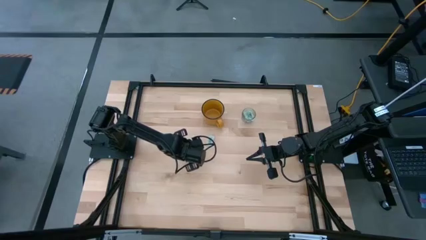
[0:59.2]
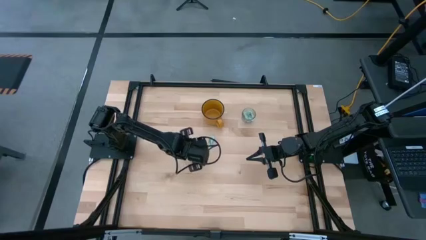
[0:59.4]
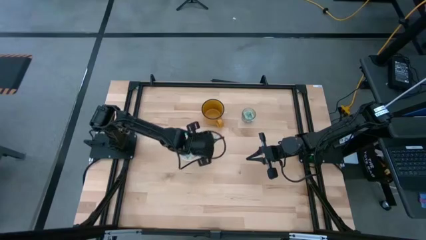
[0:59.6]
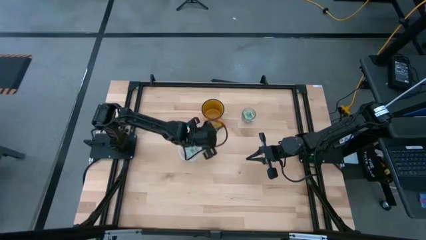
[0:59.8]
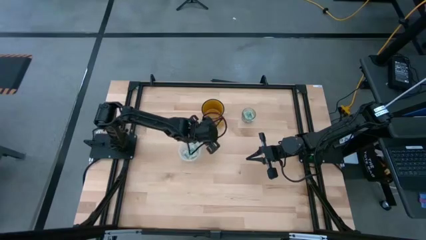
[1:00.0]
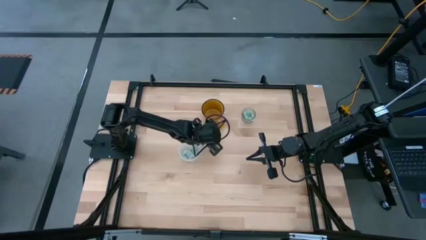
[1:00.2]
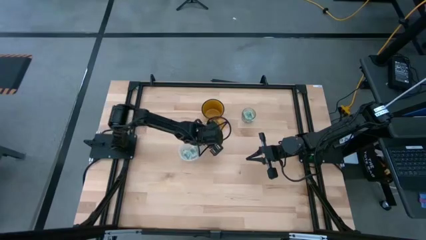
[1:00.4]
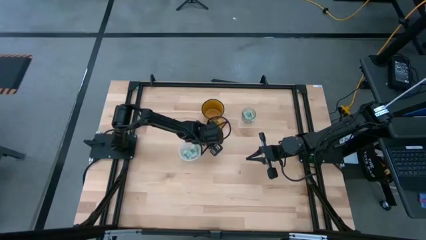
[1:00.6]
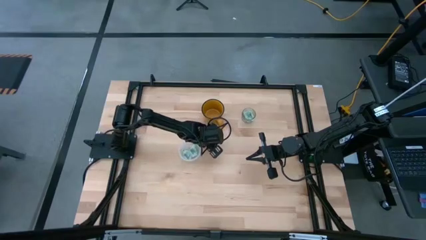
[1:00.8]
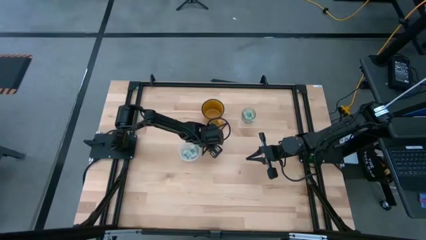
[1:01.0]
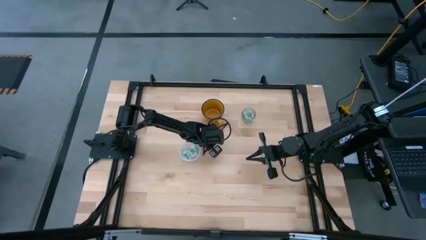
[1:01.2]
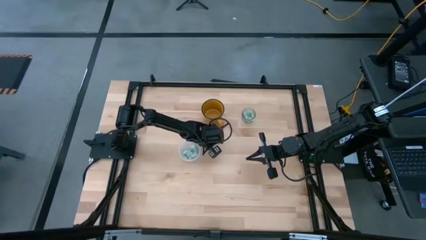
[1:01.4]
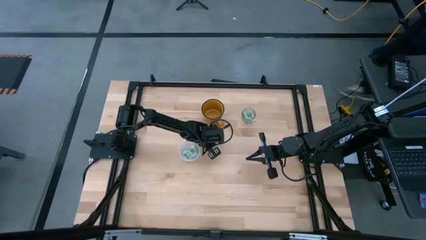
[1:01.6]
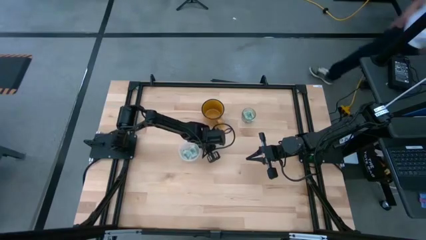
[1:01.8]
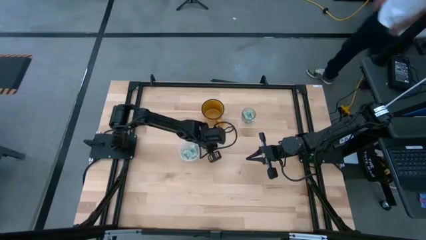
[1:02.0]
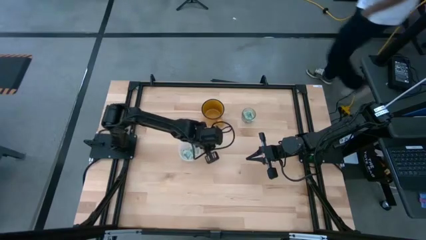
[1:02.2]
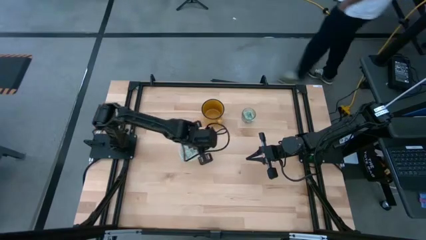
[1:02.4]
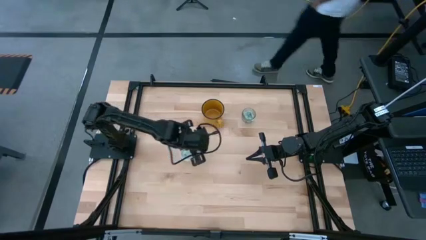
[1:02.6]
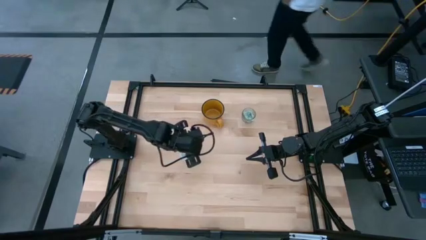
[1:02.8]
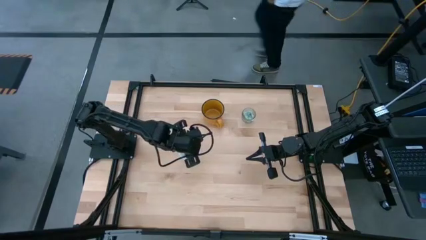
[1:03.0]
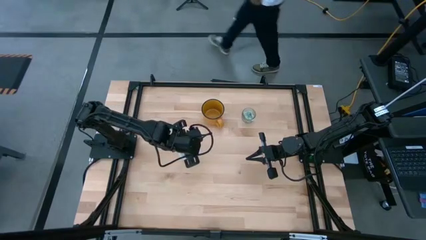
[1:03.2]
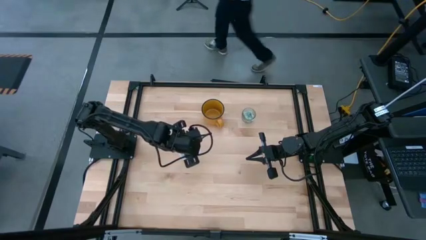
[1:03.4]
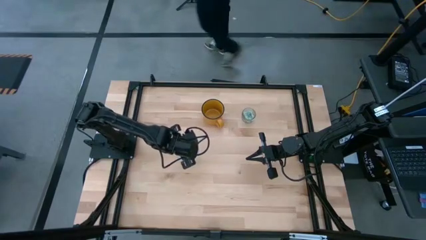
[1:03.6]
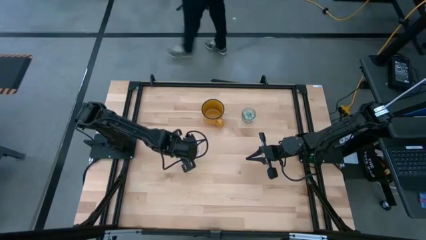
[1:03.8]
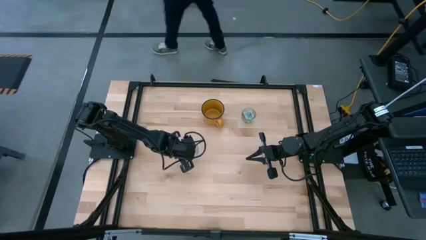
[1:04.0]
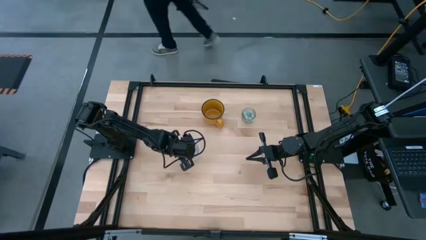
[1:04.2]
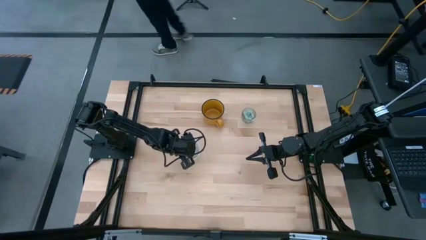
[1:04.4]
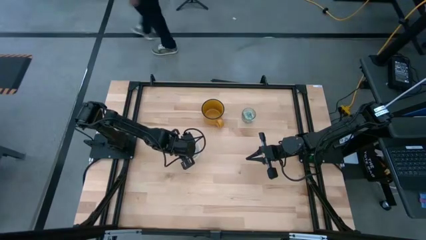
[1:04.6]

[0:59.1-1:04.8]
Task: Pick and place Stevia / Truvia into bins
Put the stevia packet into the transparent container

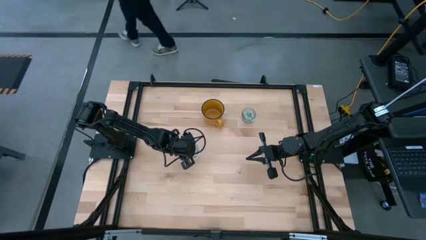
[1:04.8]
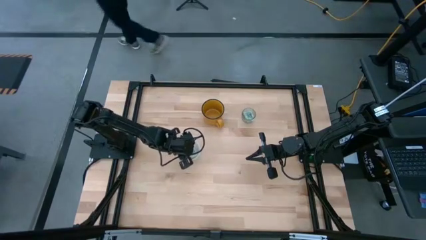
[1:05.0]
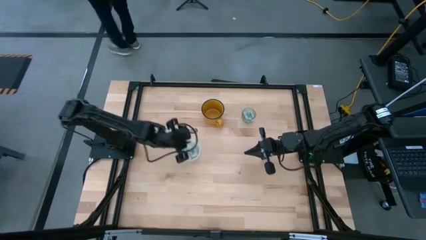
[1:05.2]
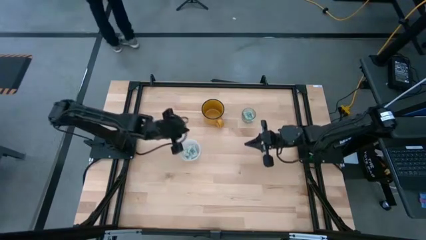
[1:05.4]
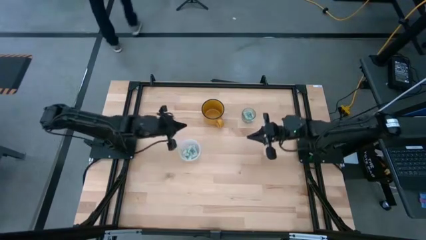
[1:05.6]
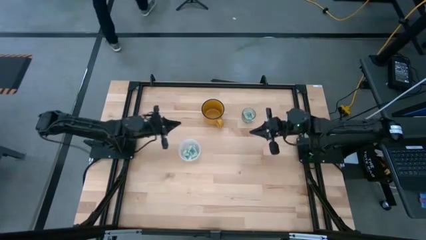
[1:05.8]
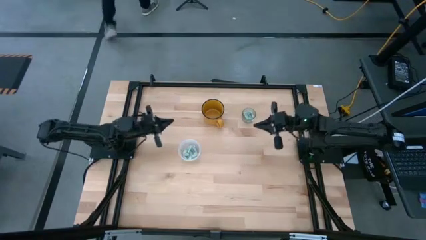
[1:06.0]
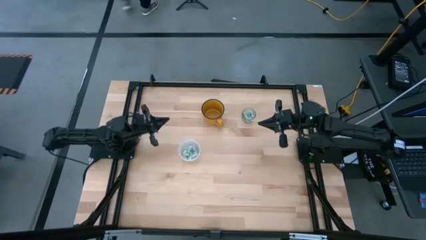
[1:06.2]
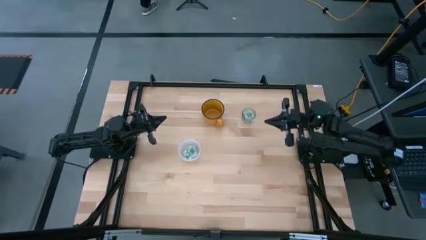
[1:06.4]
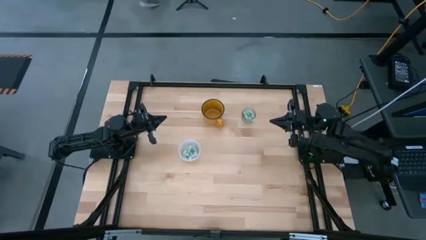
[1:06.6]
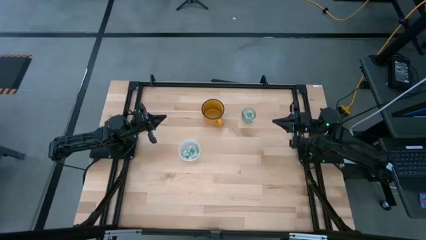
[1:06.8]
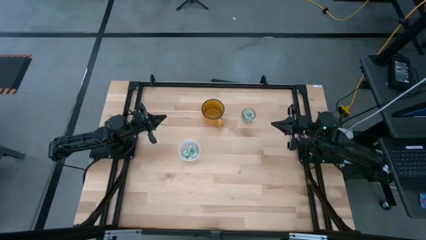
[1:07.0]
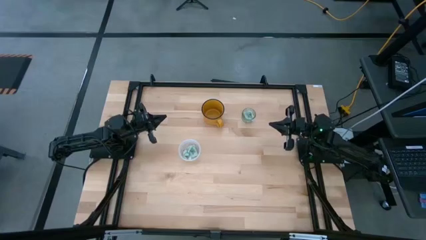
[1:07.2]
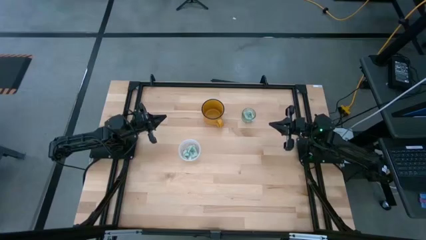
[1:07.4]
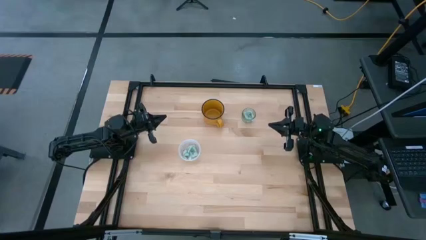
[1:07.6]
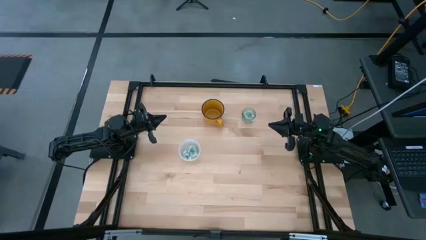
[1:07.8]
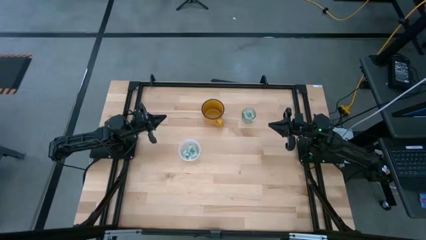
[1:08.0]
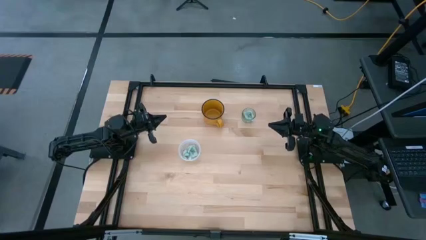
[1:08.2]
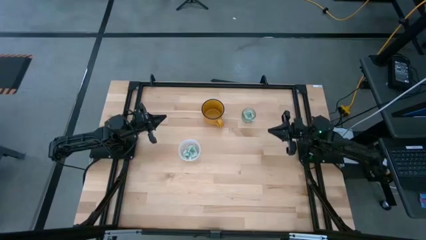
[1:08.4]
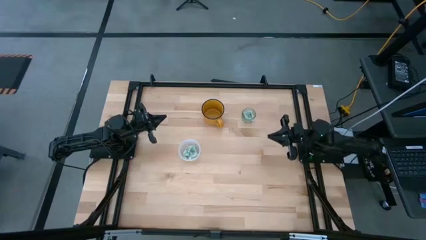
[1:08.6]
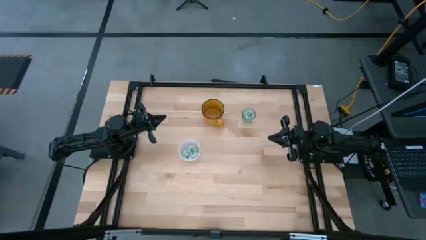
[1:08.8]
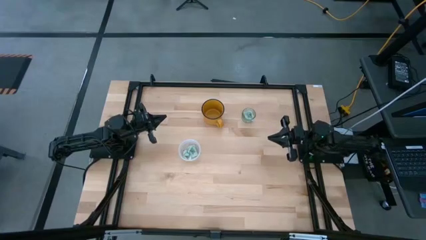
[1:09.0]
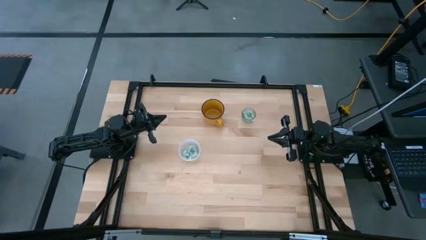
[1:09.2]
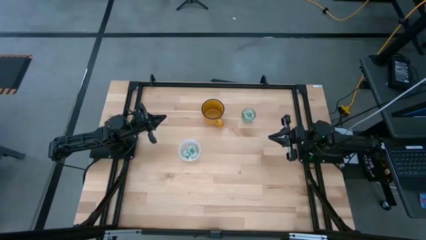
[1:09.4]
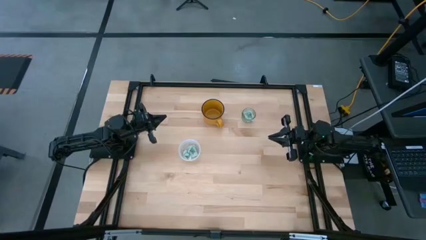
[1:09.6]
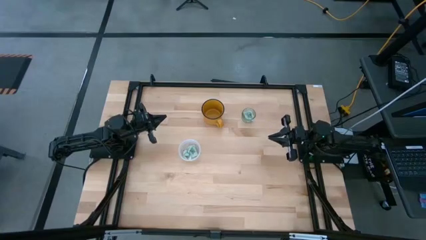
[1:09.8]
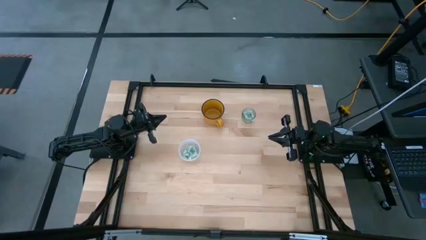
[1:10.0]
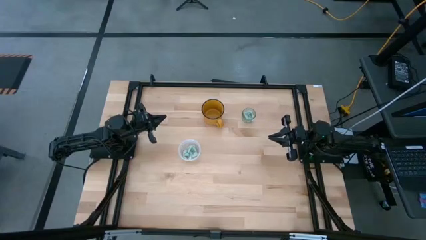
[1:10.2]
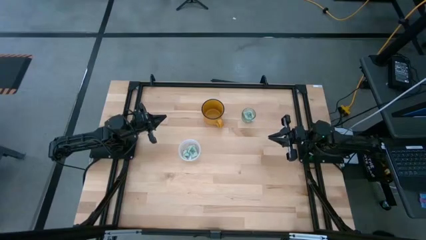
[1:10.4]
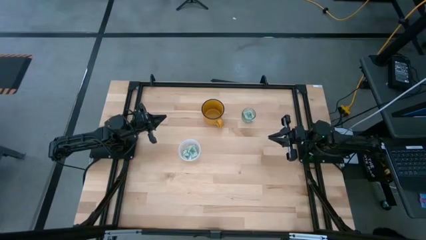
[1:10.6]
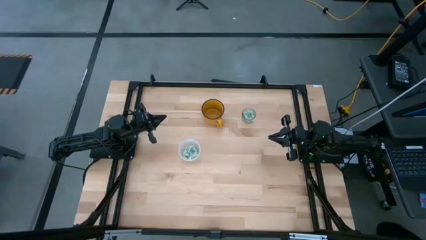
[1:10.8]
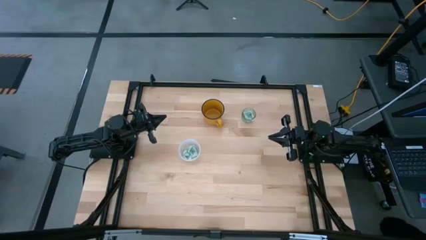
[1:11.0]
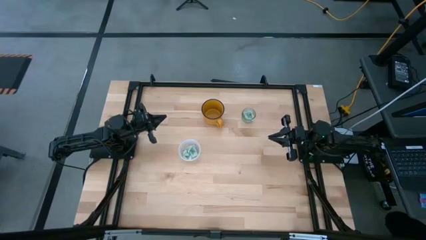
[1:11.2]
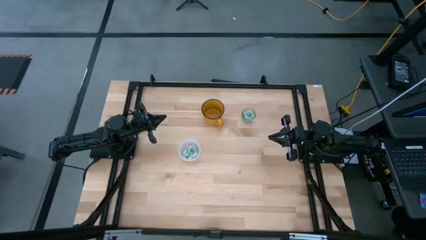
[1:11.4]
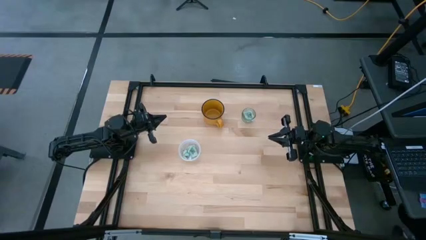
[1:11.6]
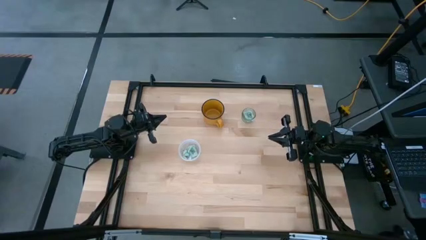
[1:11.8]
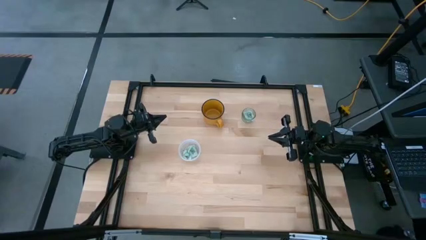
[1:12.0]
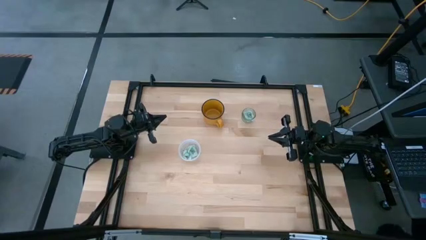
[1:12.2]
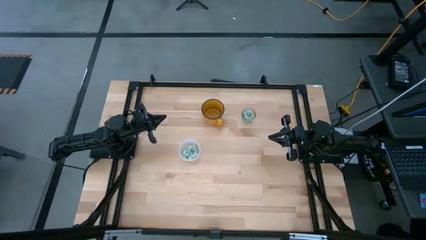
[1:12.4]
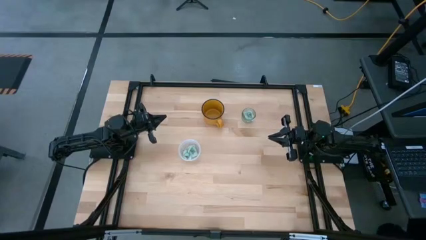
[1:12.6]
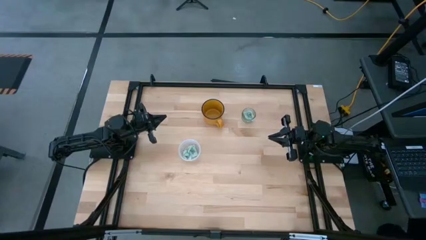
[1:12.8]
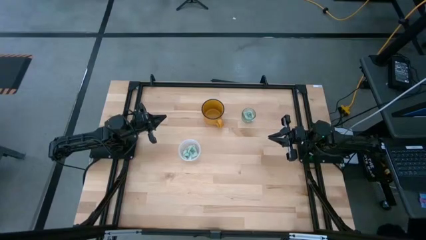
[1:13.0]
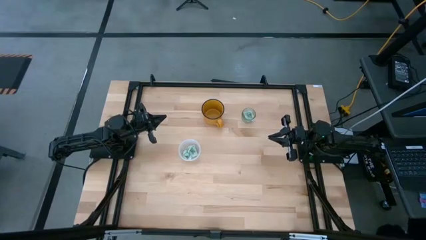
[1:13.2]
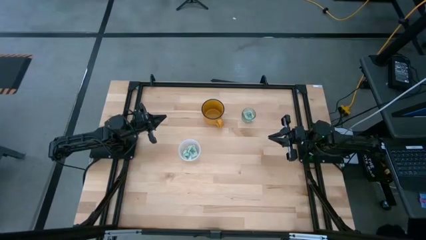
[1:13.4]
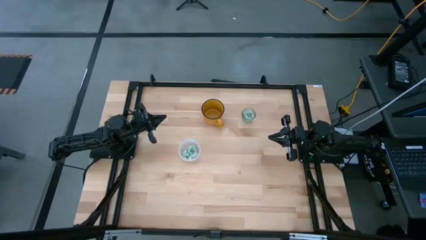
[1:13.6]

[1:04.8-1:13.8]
Return to Home Position

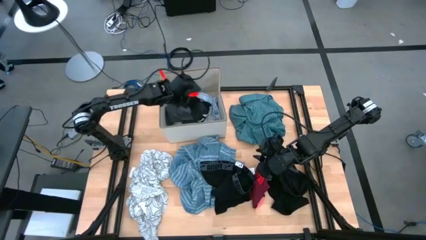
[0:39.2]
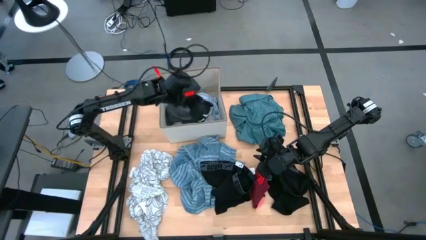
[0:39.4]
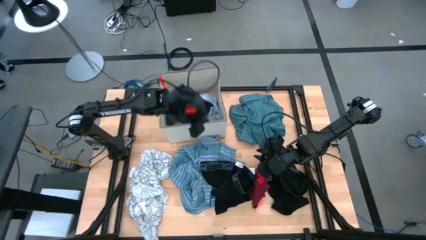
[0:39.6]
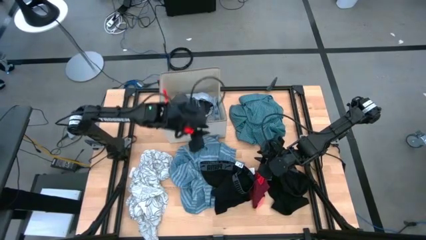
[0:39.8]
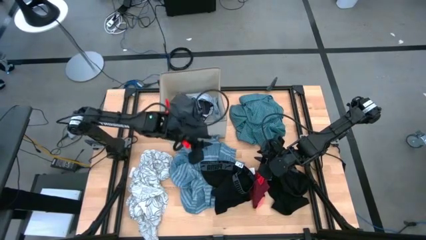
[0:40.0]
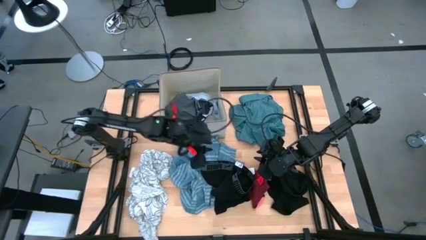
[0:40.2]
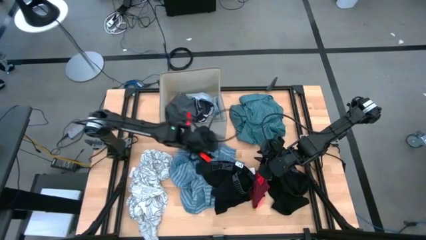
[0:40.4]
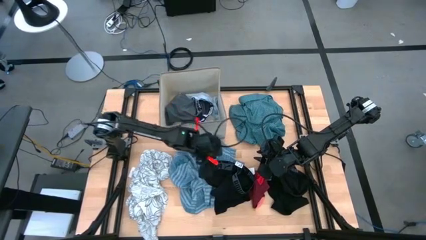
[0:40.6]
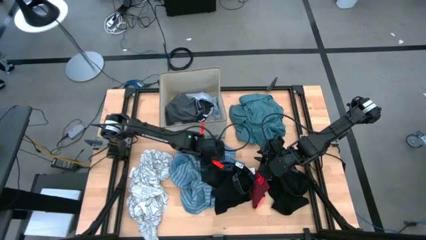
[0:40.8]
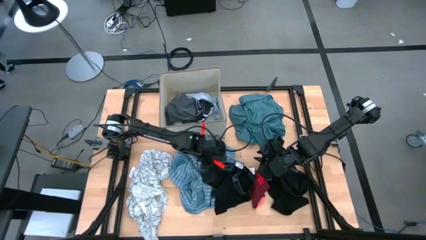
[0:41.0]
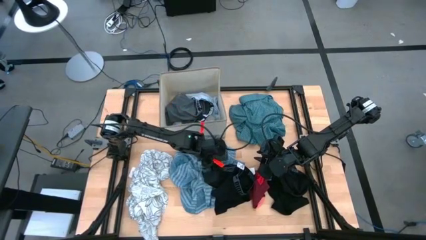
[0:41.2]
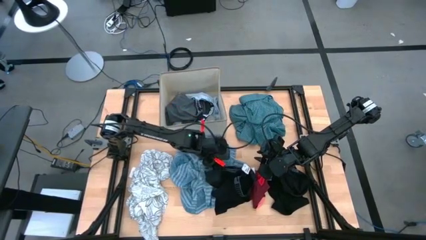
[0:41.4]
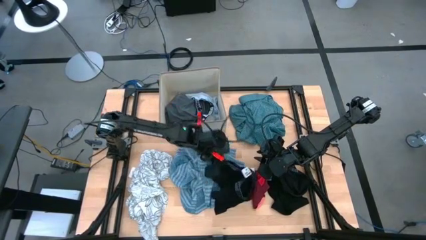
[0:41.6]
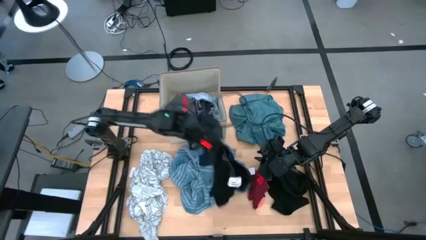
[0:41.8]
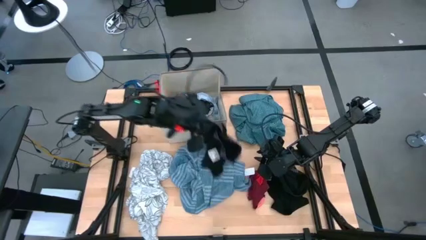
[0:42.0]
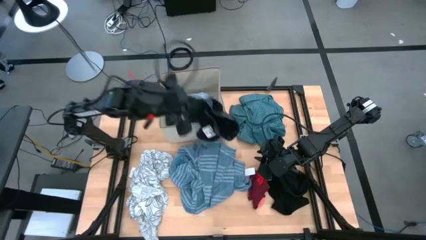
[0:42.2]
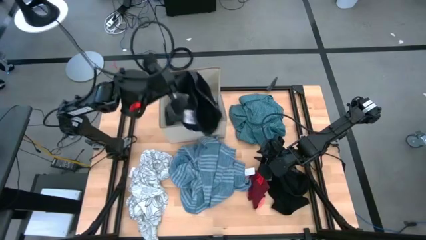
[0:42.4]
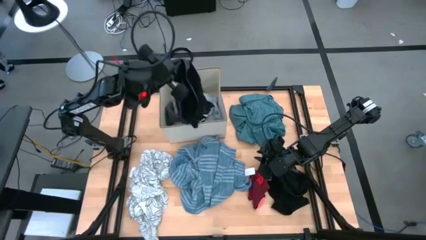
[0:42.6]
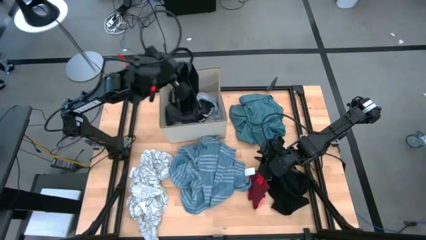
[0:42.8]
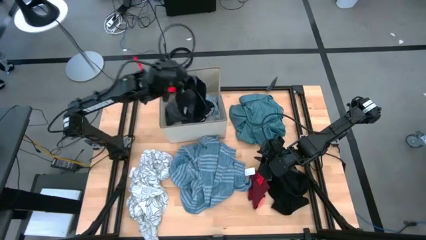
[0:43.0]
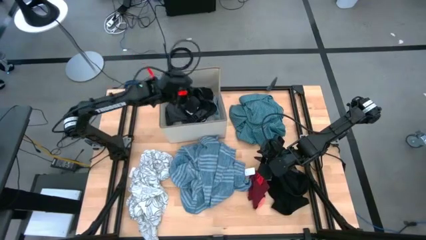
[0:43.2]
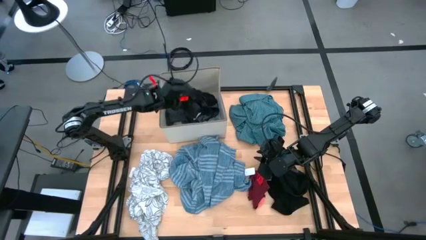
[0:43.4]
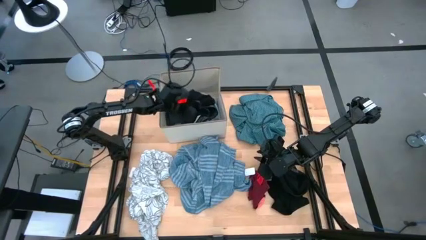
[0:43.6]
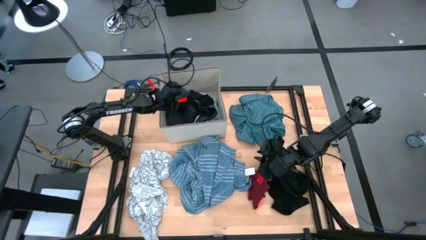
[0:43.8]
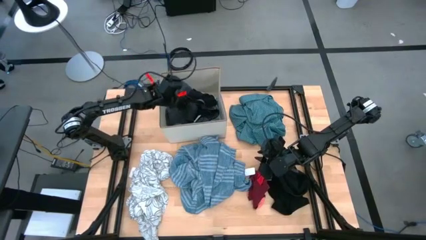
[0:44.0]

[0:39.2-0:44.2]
Task: Sort clothes
Put the black underwear into the white laundry organizer
